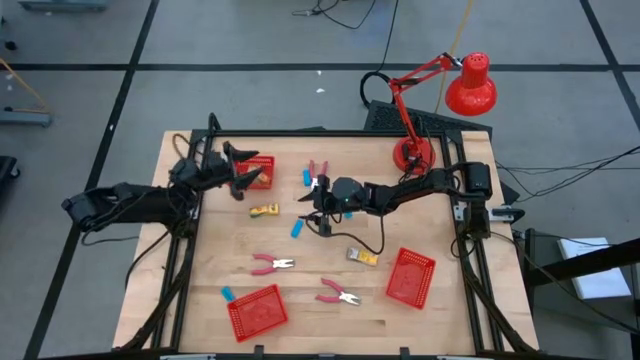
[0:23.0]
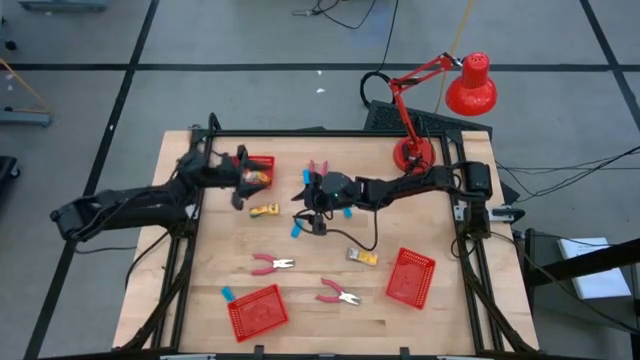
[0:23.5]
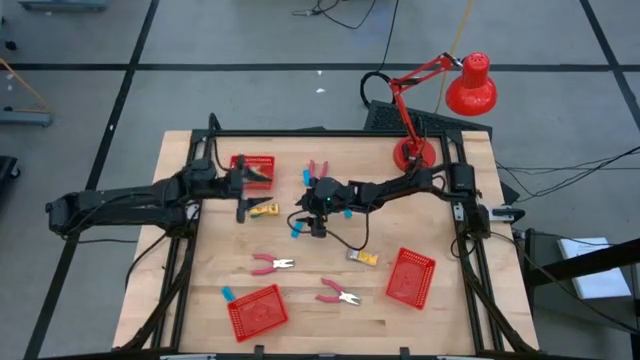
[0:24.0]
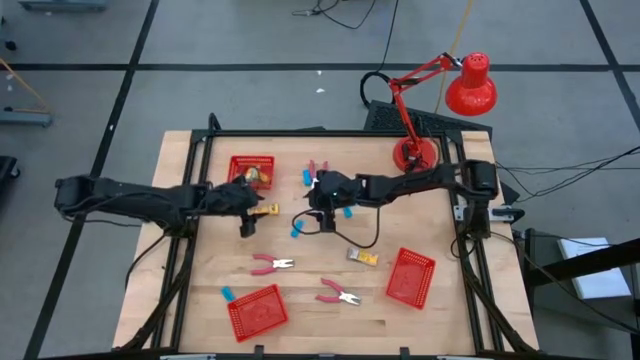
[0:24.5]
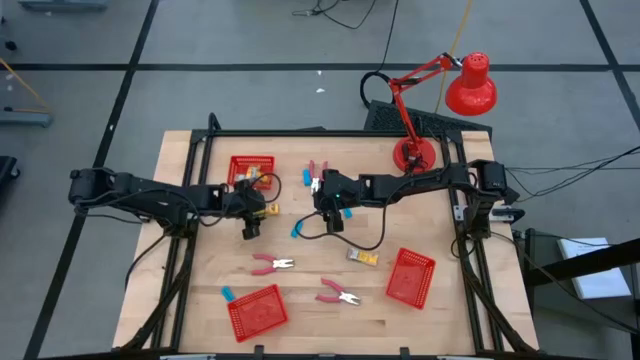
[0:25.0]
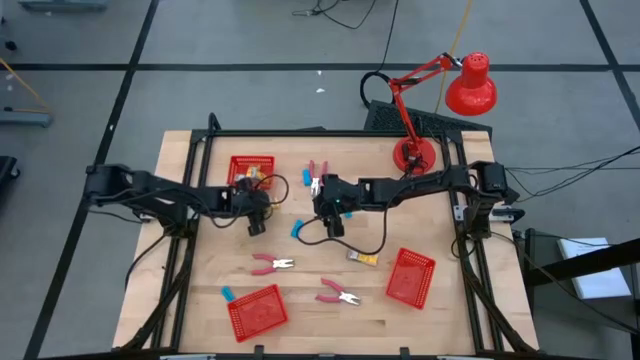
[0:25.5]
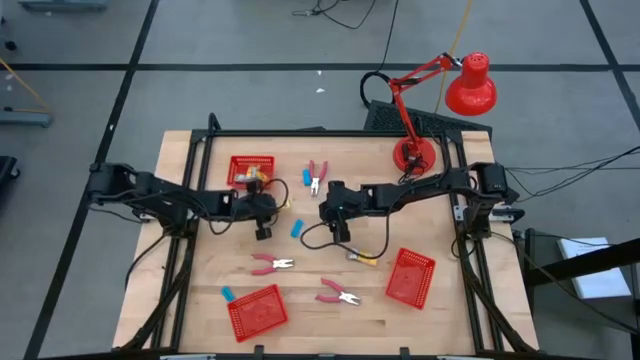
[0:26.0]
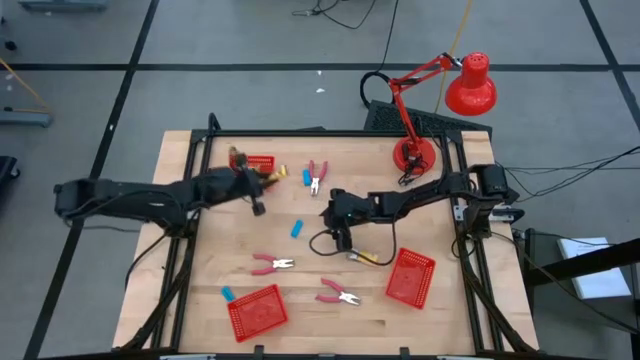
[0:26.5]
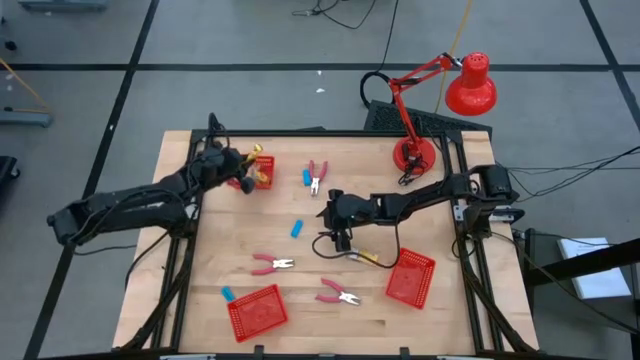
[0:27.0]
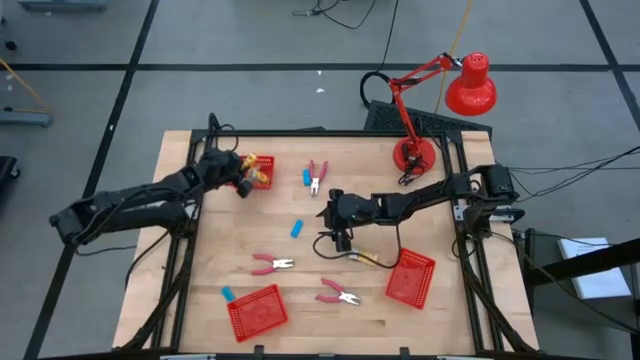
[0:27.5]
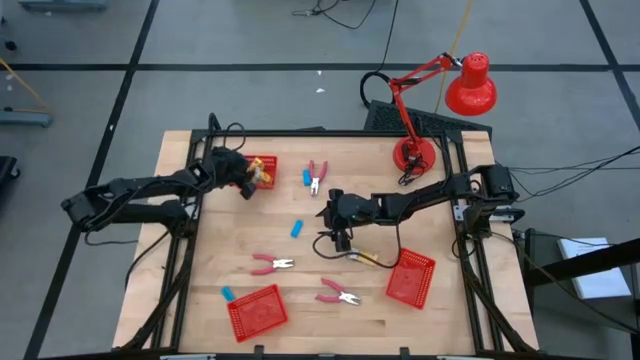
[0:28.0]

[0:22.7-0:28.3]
Task: Pick & Place School Supplies
Put the yellow crayon box into the top red basket

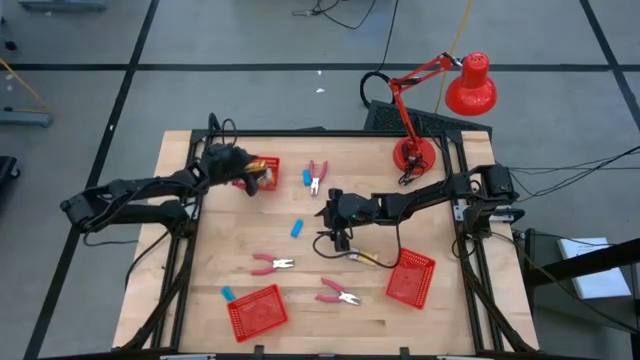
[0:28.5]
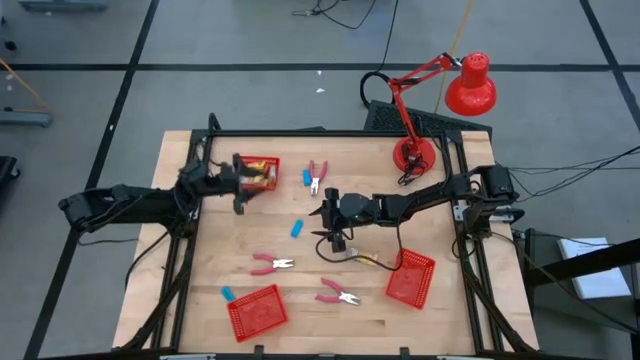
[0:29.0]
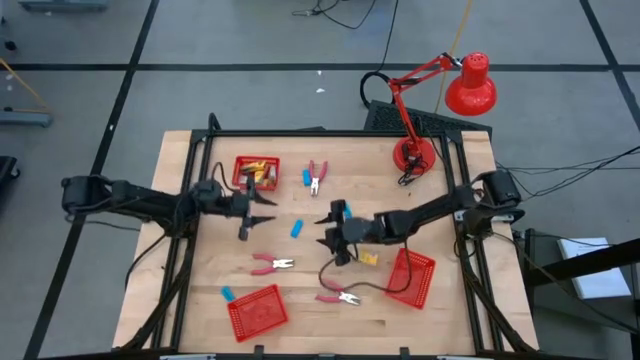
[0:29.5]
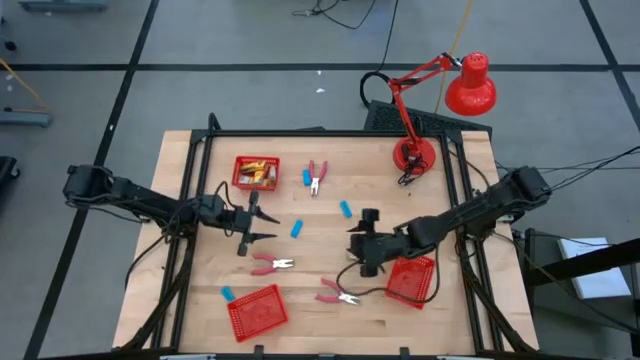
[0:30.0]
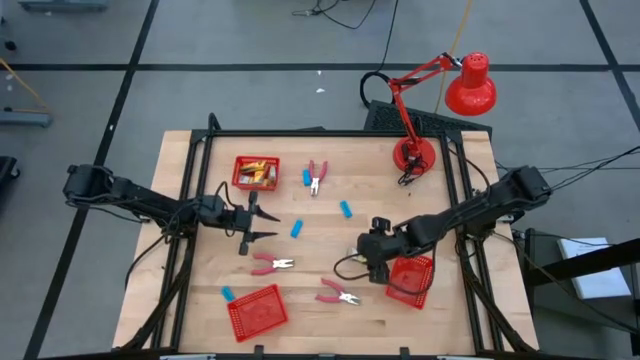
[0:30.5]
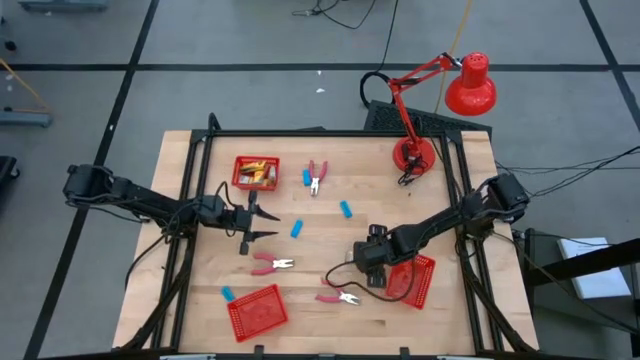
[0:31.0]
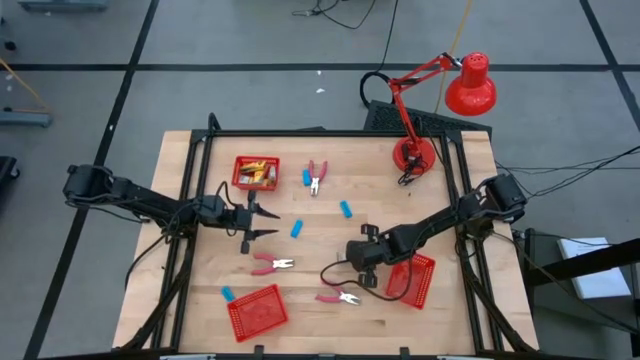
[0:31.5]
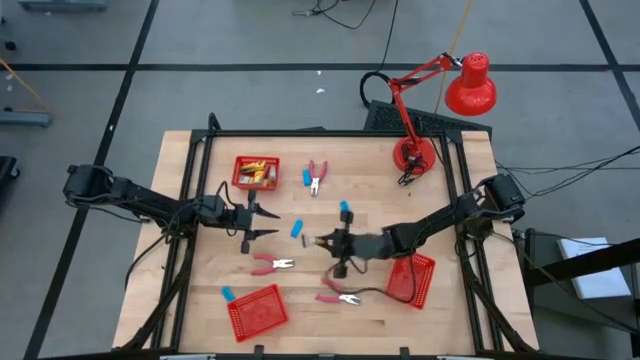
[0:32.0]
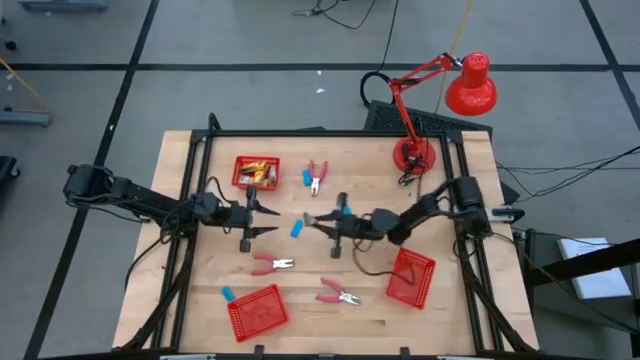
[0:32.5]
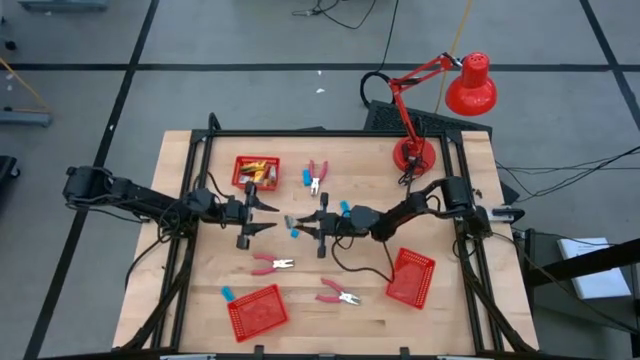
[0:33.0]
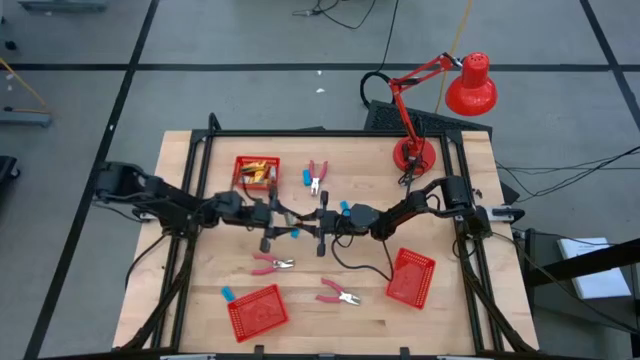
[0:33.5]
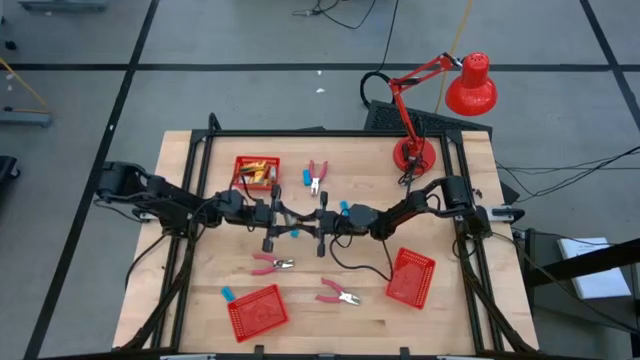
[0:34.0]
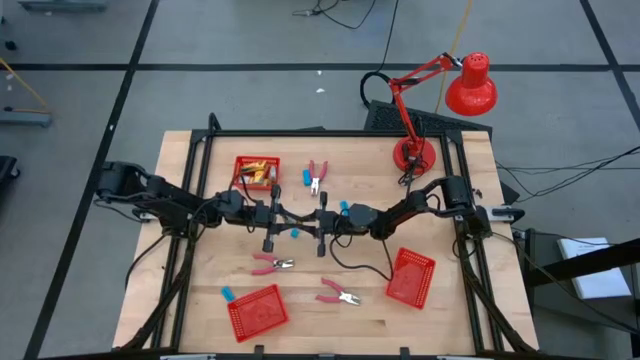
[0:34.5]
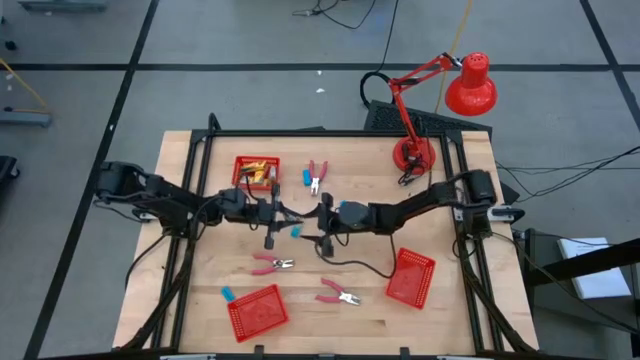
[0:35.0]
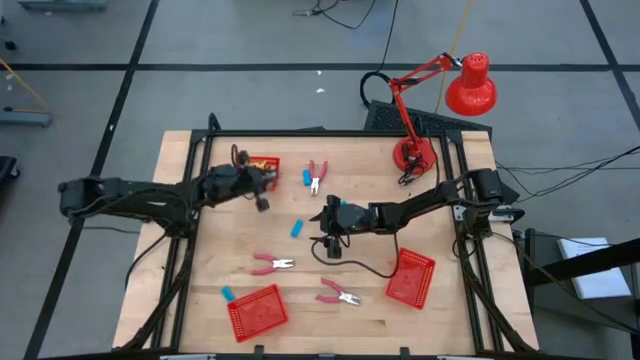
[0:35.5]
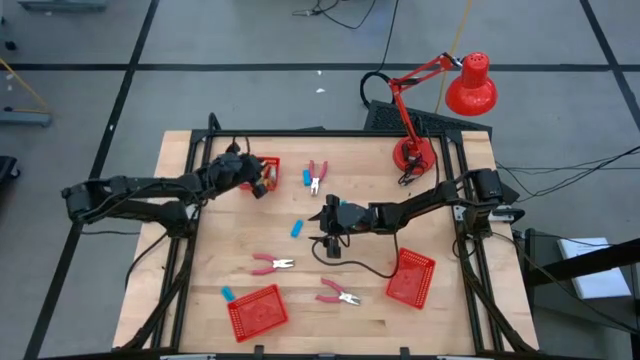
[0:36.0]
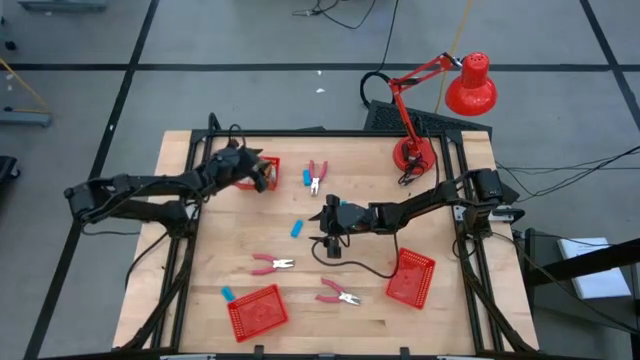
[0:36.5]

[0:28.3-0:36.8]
Put the yellow crayon box into the top red basket

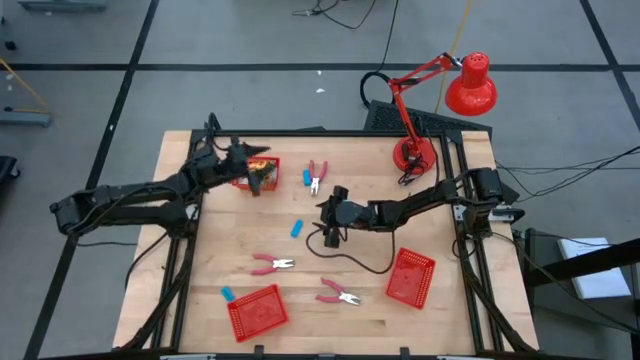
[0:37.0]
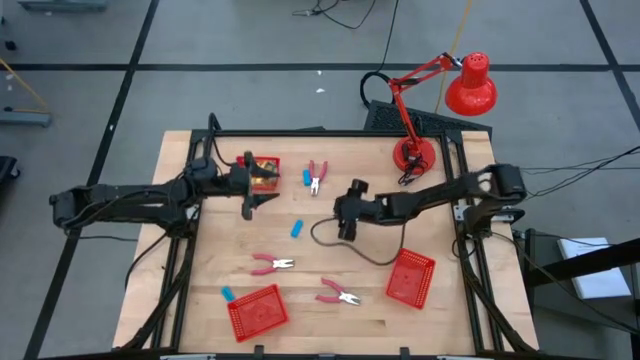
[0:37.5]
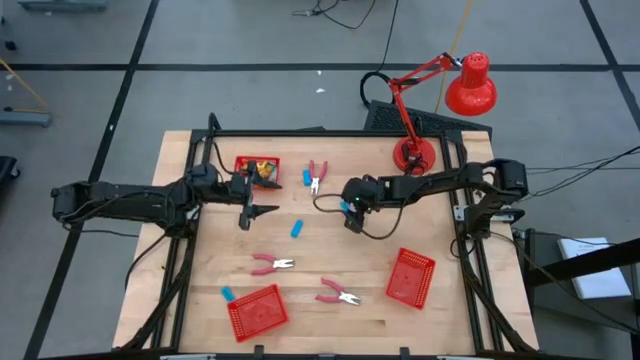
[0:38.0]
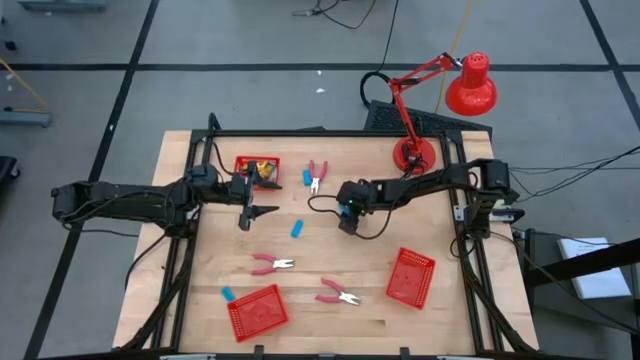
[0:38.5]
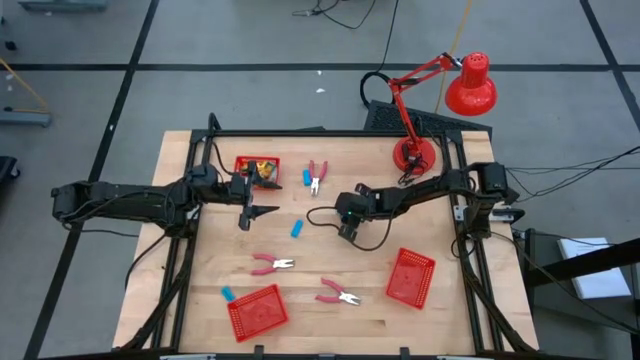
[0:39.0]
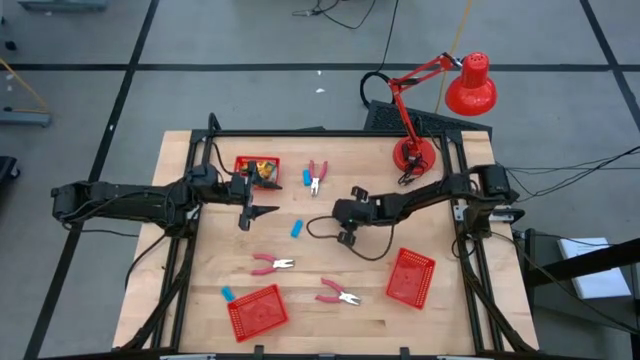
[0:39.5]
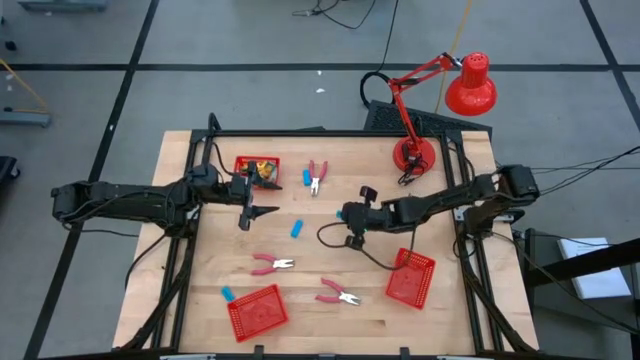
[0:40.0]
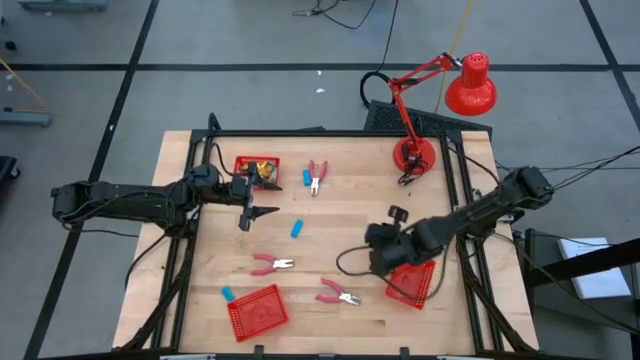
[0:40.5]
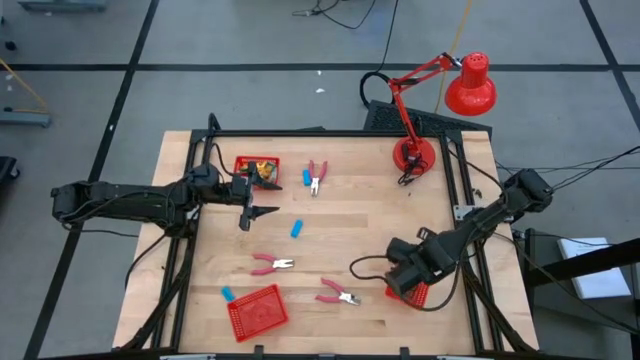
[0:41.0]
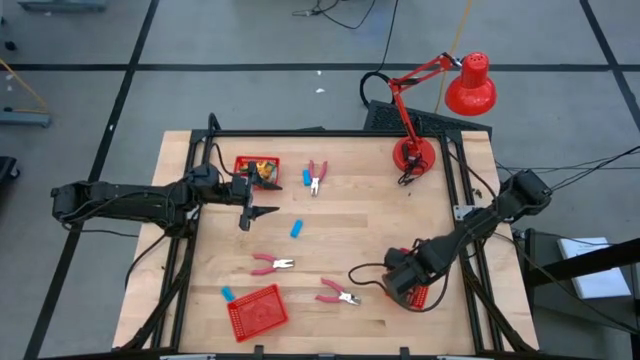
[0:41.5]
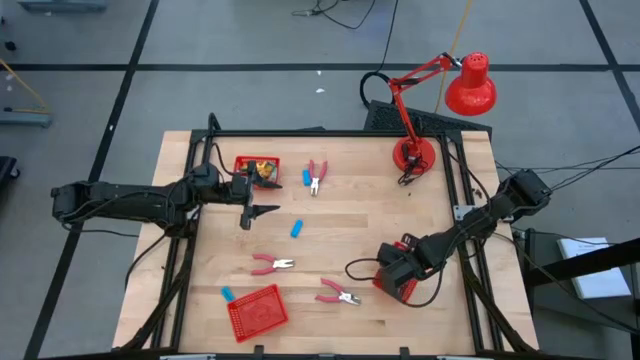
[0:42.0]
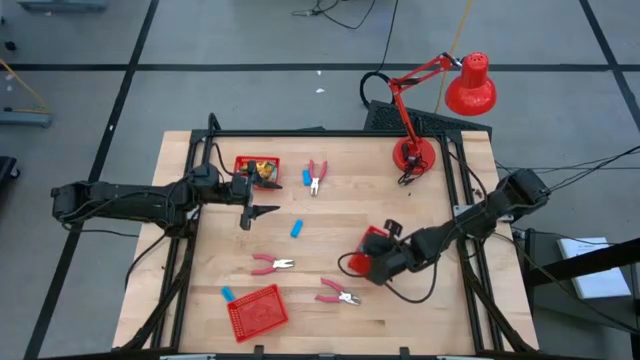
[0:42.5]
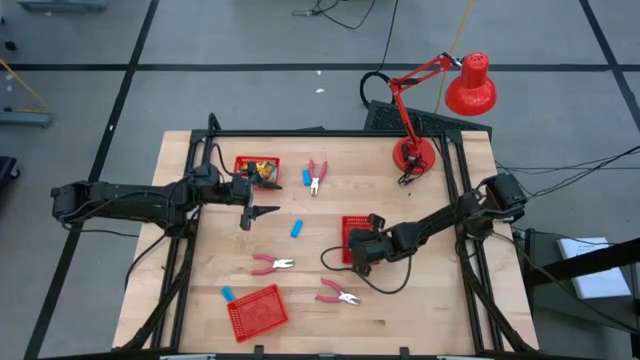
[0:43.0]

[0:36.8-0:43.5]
Put the blue eraser into the bottom right red basket
